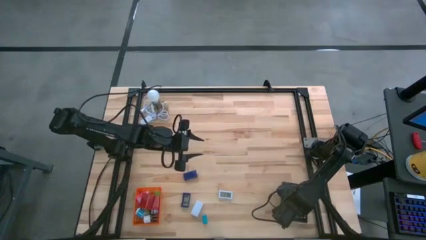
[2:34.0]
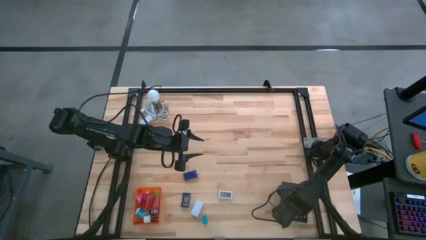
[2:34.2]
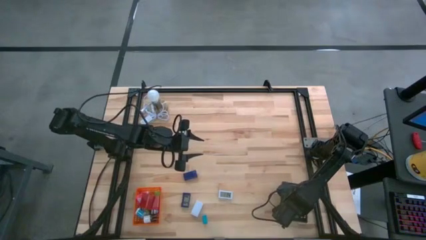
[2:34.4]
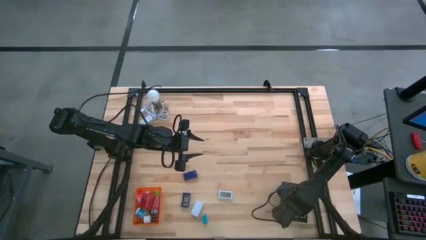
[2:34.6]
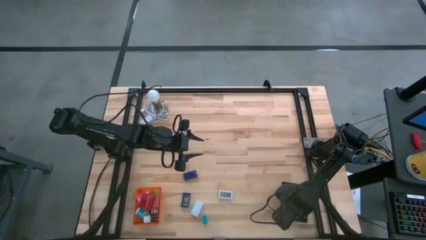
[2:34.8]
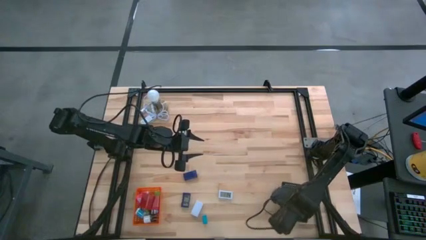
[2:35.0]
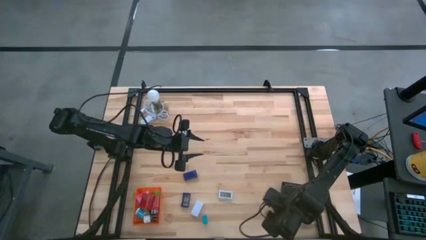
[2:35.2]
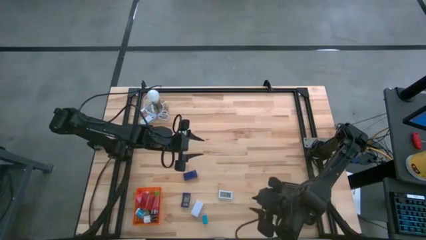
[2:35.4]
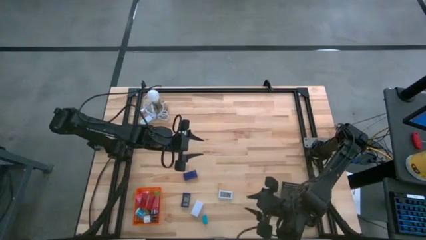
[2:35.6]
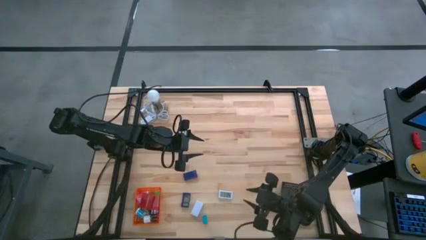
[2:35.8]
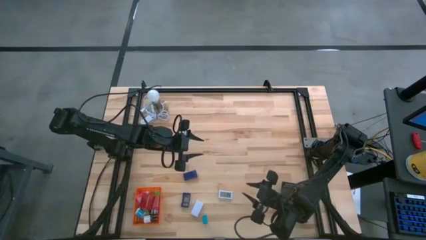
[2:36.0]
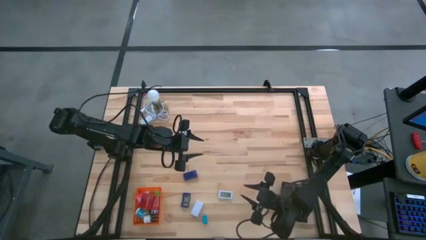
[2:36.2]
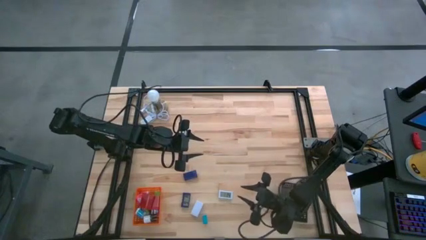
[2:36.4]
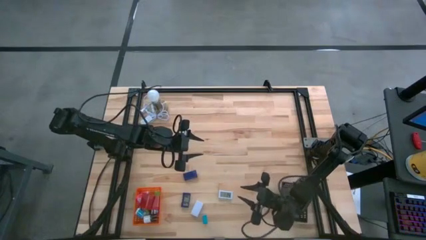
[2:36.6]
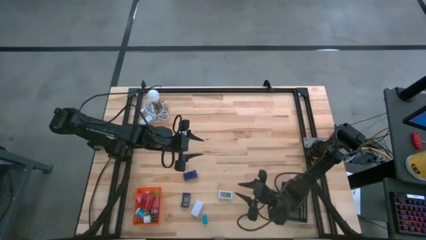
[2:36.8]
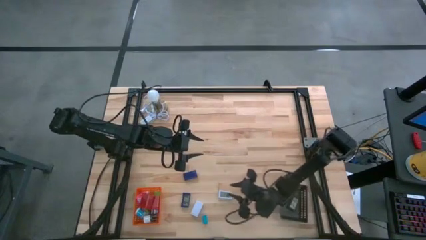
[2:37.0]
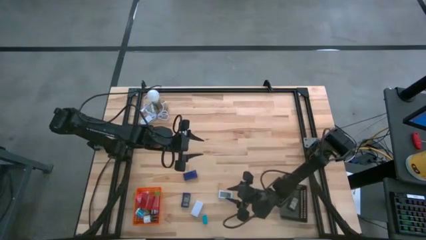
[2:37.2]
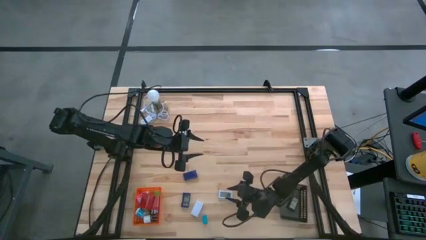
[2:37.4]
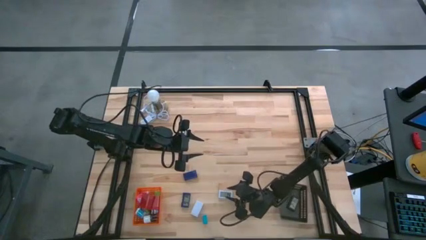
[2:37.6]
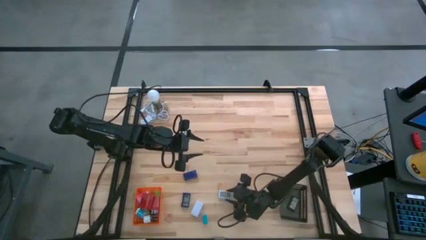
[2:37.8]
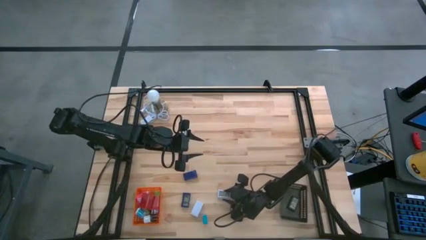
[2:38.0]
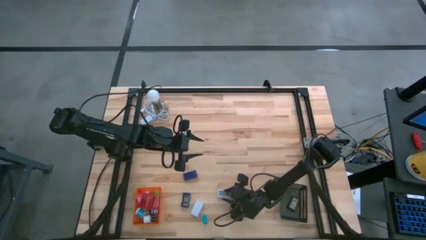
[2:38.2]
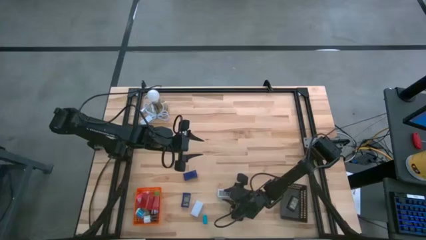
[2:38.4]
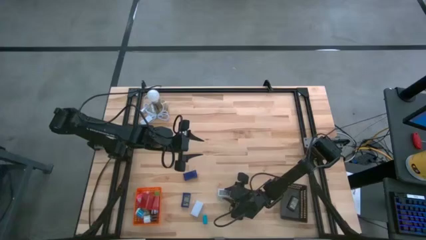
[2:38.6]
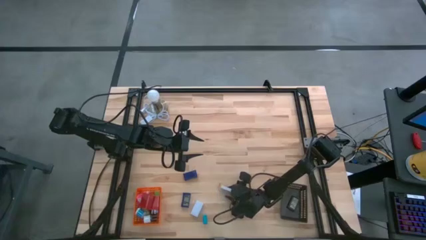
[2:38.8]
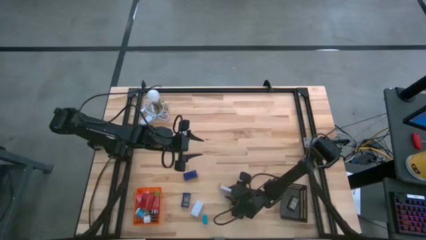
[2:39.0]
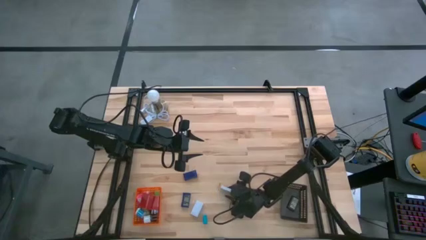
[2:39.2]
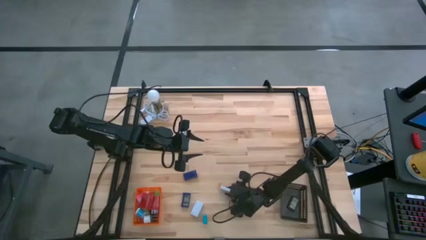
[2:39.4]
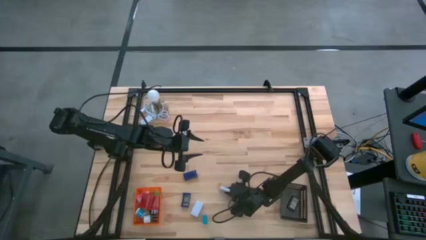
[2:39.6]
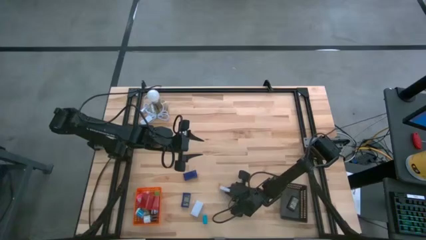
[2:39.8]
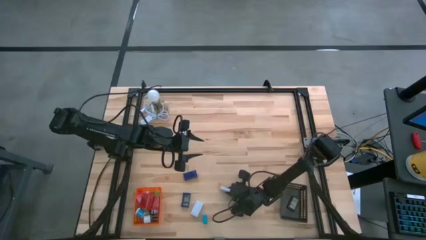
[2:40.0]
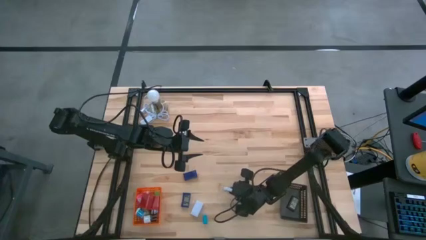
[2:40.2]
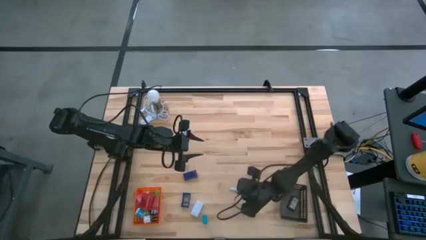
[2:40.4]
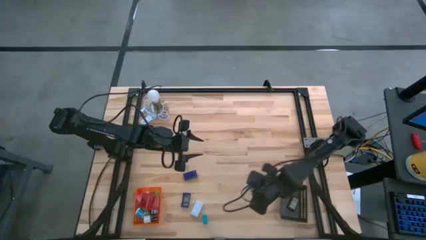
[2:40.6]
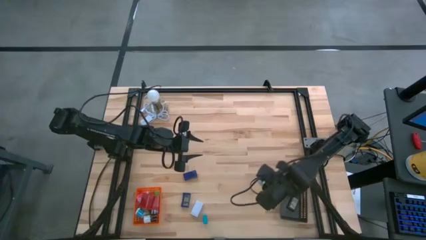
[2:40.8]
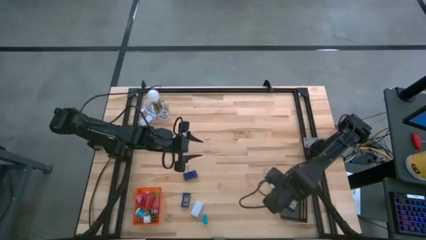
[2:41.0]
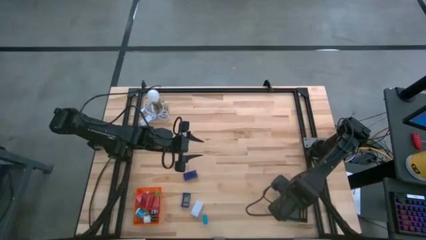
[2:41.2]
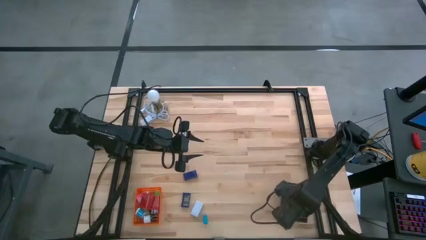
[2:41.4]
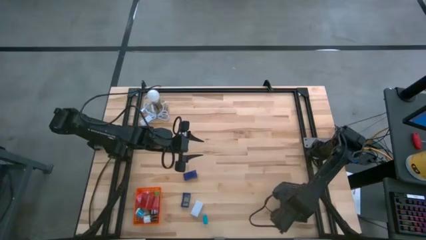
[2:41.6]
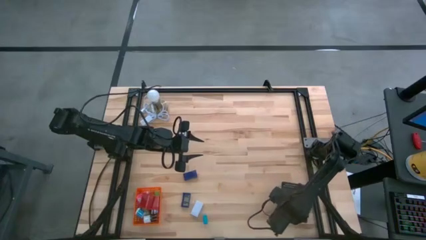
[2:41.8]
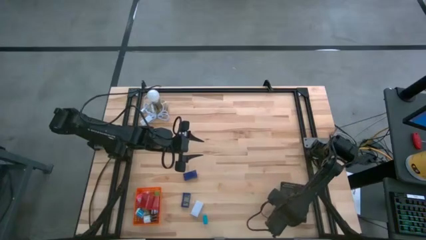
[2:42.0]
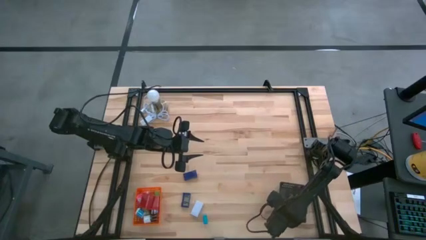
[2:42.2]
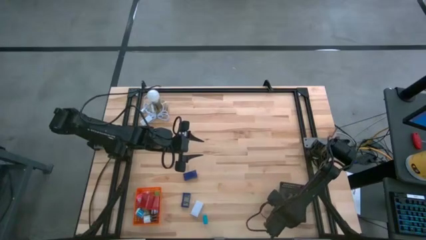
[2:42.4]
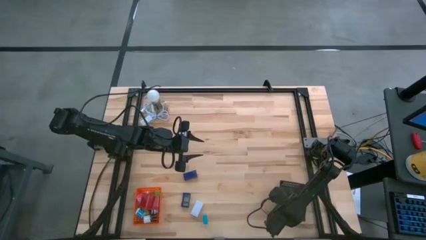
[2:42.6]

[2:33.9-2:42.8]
Task: Pick & Place Office items
Put the right white digital clock into the black bin

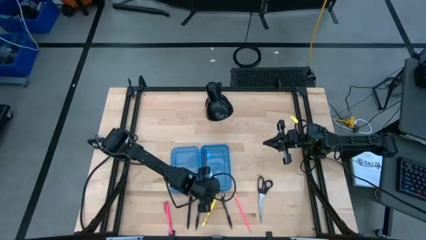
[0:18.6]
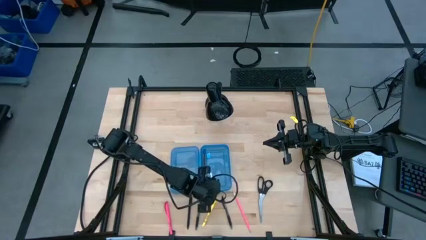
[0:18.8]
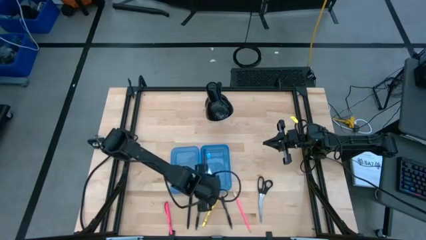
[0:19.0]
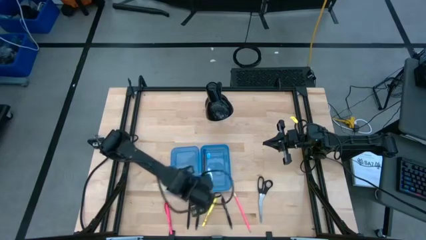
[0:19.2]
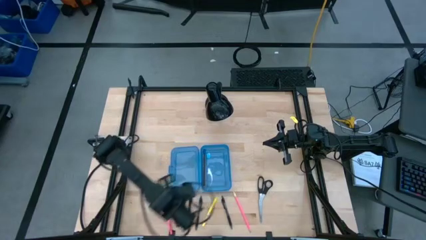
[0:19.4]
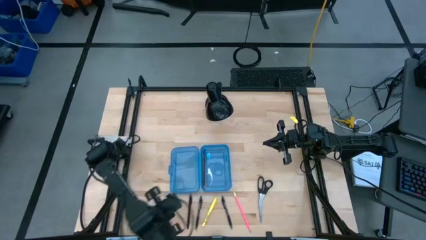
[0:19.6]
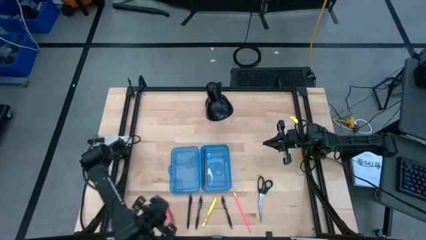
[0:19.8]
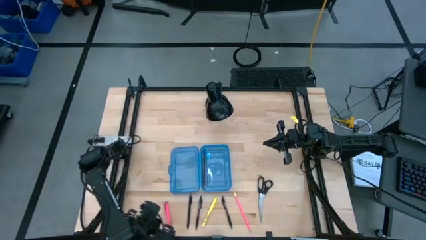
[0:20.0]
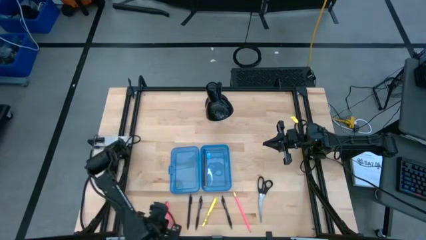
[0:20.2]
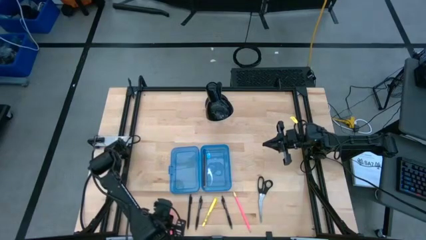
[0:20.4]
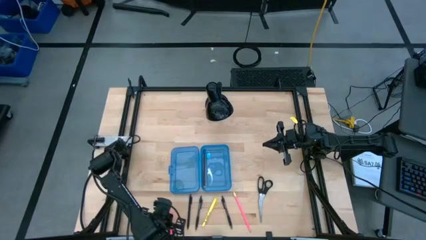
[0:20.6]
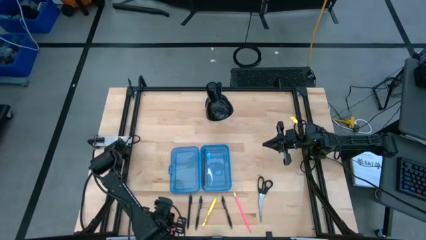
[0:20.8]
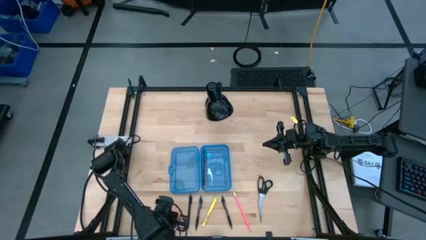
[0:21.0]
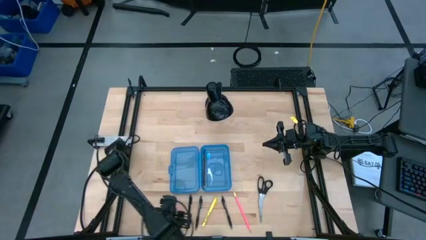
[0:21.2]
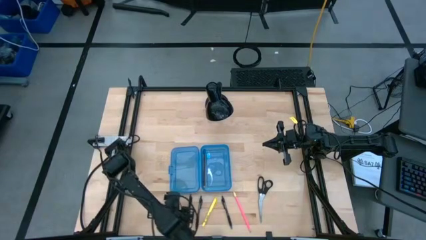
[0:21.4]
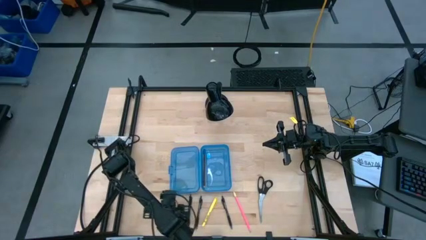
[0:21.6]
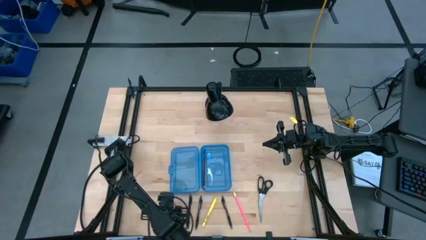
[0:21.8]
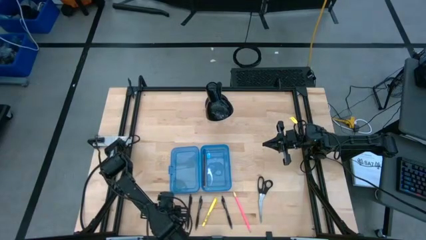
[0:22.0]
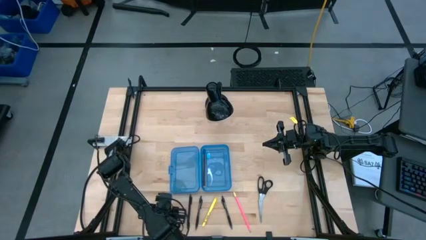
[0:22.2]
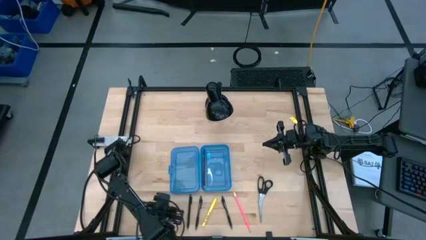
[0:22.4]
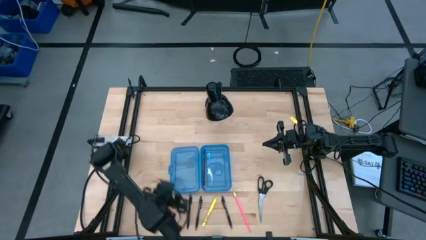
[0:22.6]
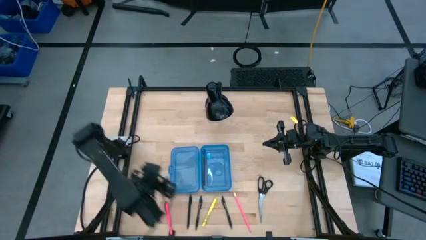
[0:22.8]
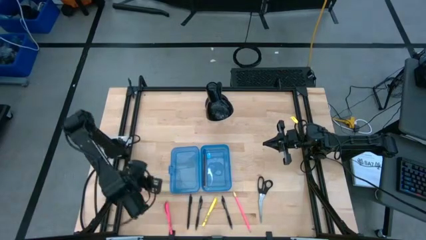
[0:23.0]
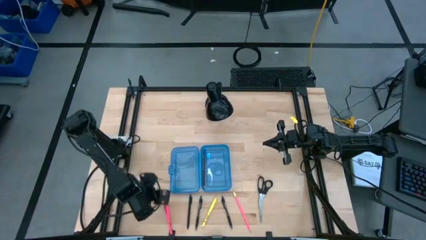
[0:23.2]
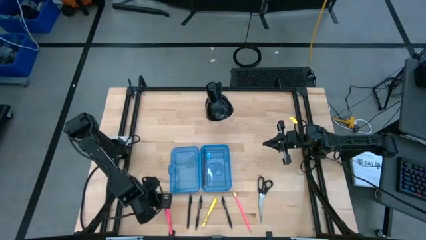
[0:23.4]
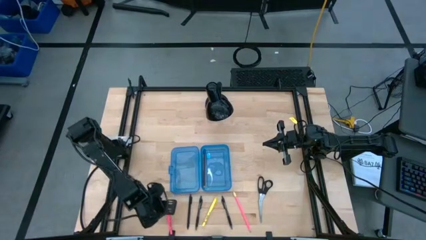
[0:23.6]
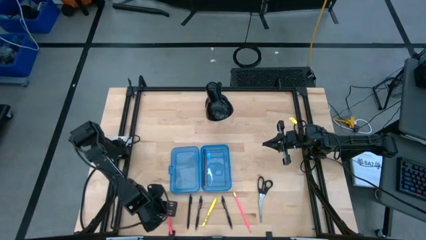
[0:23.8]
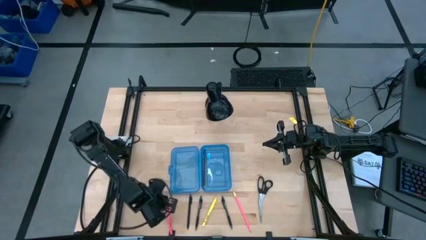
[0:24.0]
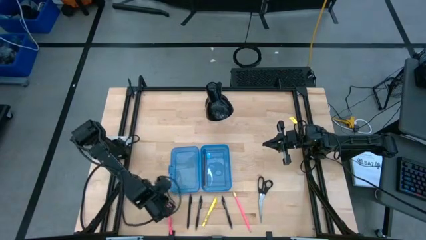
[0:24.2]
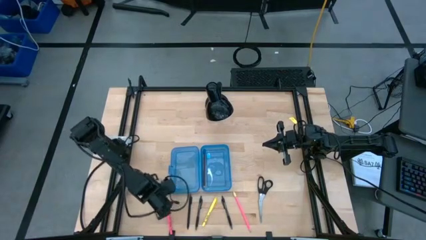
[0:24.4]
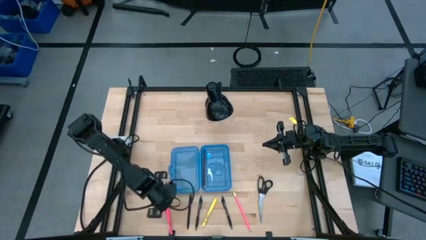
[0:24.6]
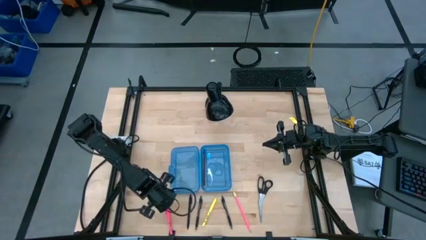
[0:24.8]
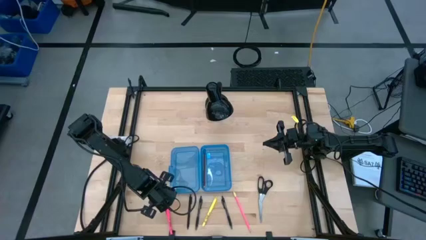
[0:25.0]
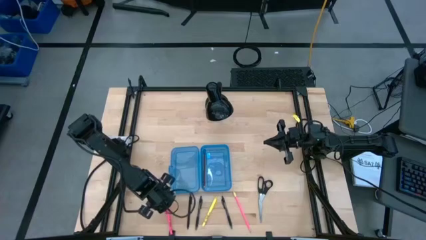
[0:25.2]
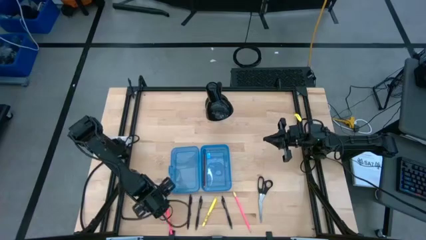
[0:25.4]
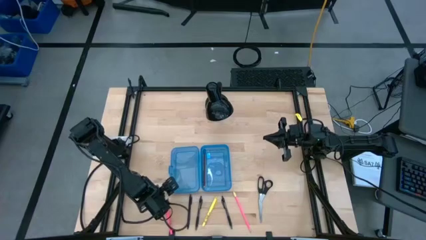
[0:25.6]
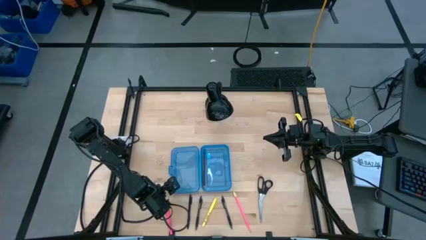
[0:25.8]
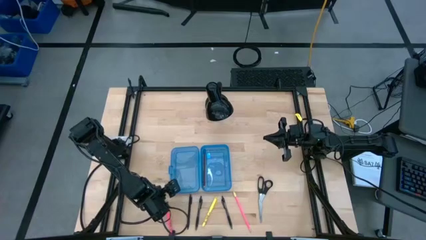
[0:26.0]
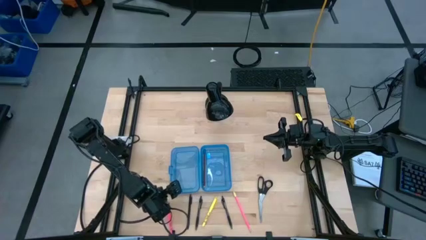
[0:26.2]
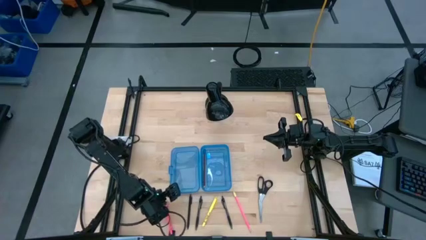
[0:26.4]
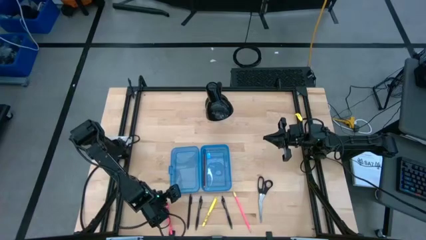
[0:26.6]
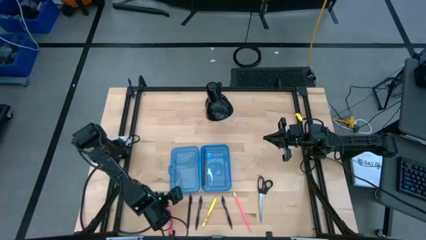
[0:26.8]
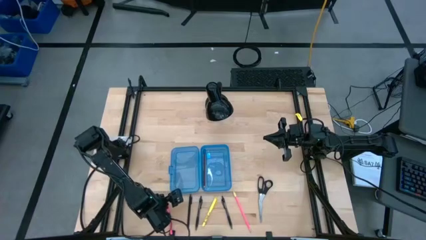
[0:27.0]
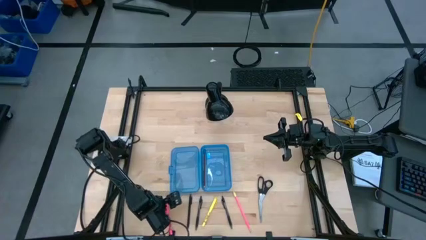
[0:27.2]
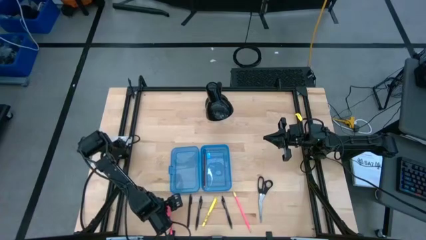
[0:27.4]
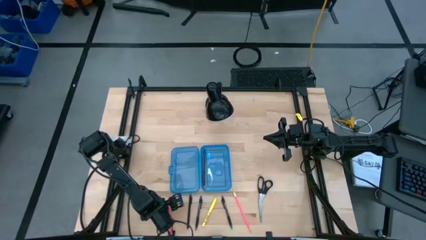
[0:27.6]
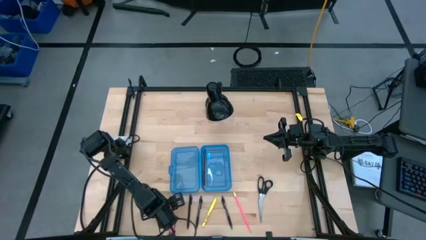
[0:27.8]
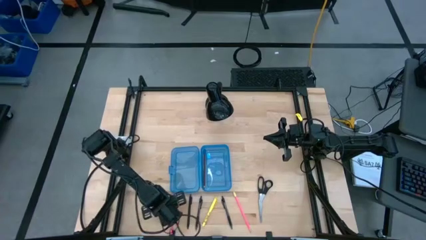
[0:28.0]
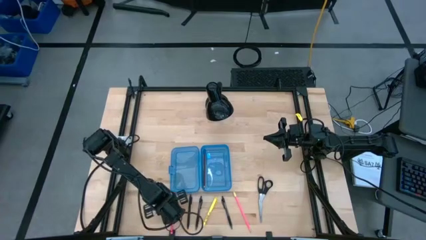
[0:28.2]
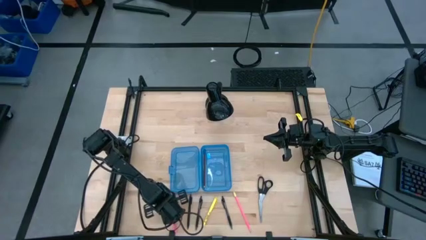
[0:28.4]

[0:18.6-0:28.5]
Task: Pick & place school supplies into a supply box
Put the pink pen into the blue supply box
